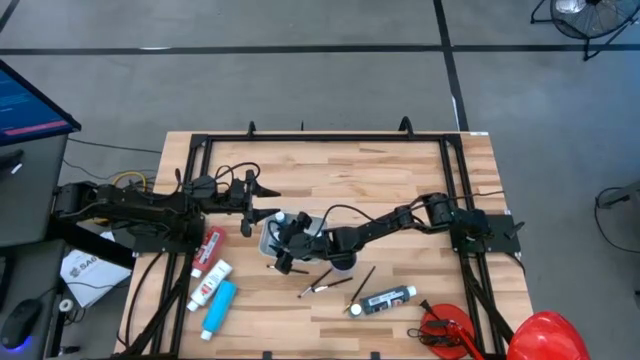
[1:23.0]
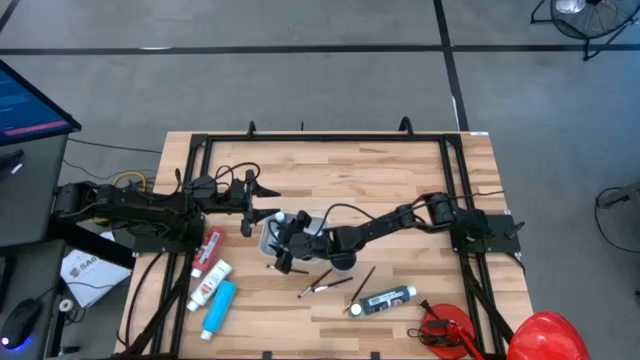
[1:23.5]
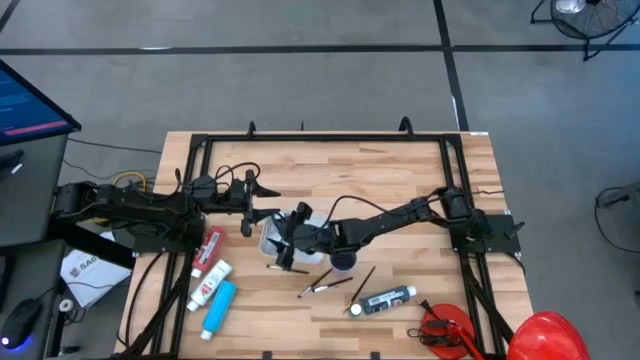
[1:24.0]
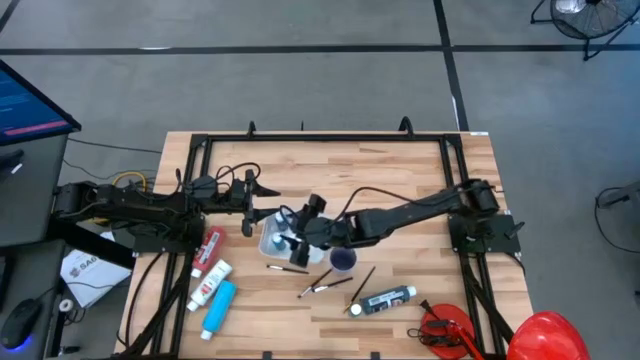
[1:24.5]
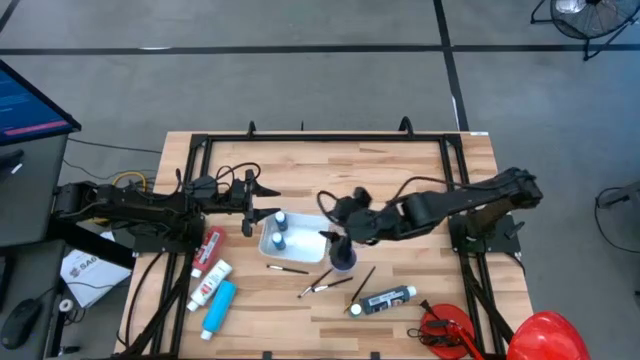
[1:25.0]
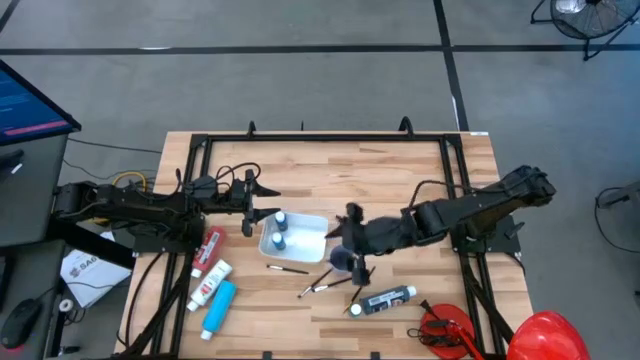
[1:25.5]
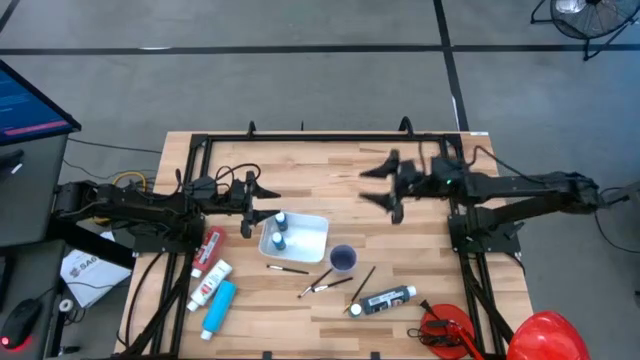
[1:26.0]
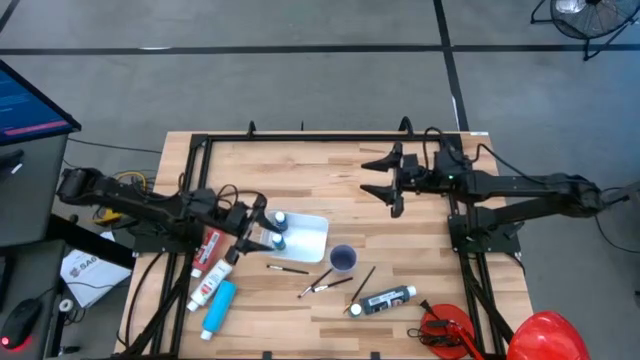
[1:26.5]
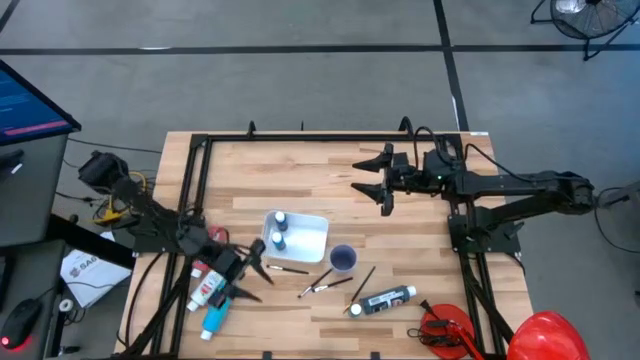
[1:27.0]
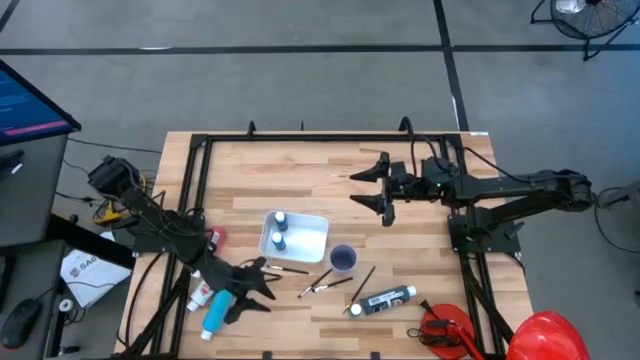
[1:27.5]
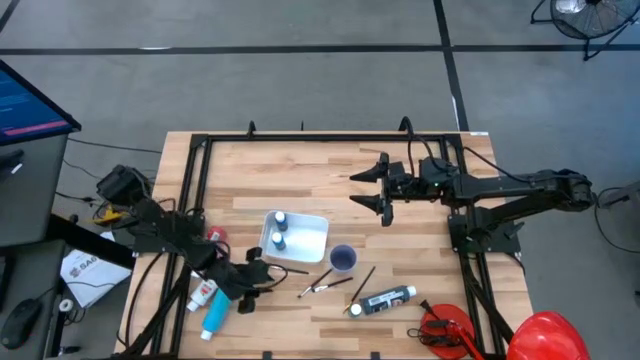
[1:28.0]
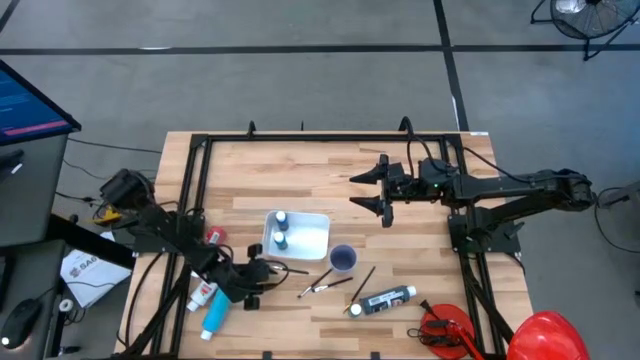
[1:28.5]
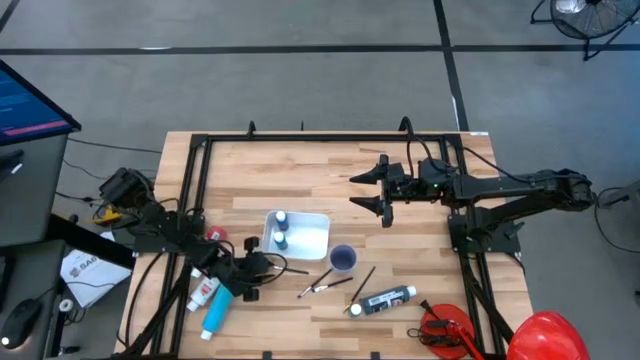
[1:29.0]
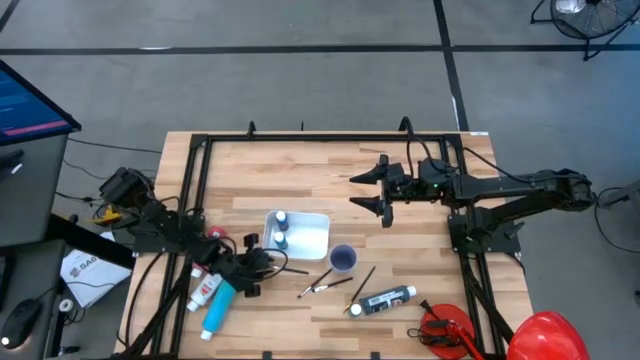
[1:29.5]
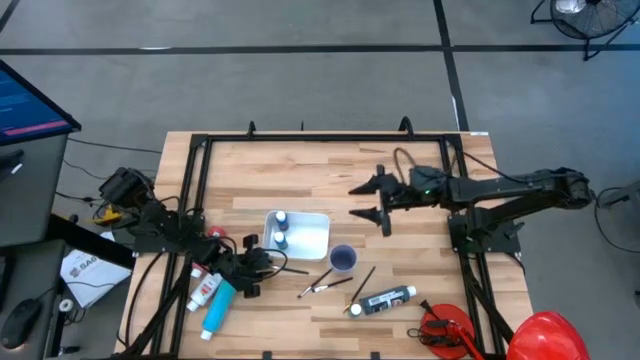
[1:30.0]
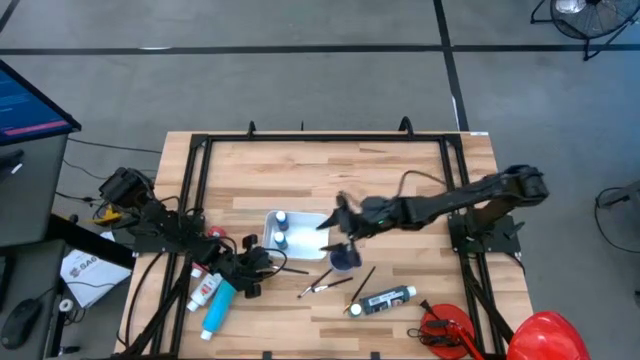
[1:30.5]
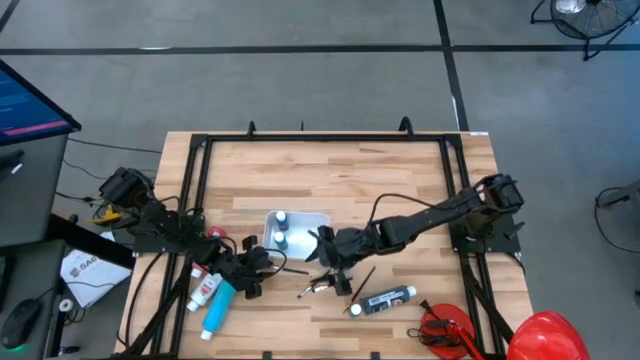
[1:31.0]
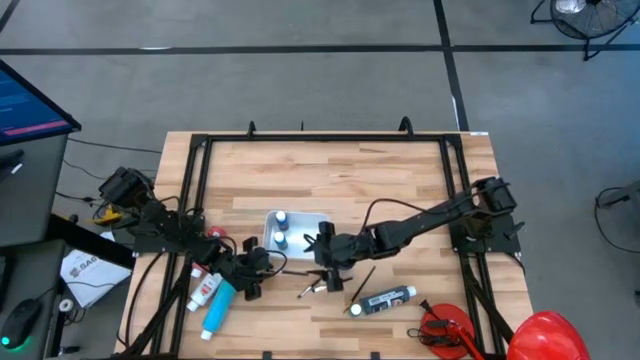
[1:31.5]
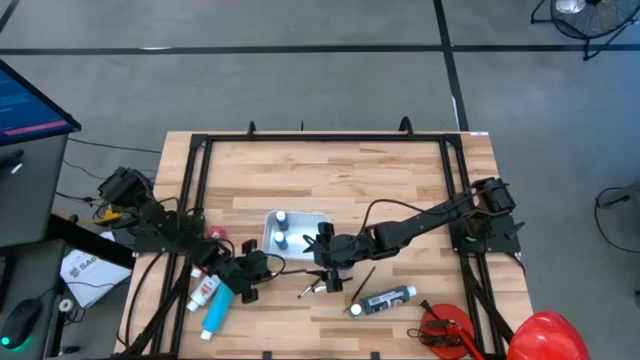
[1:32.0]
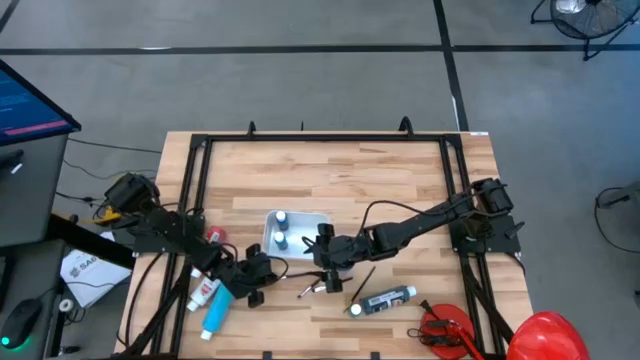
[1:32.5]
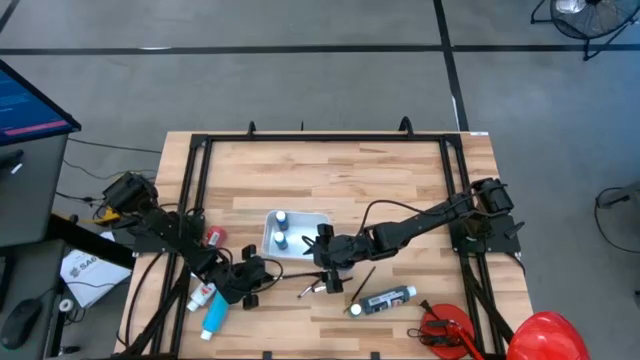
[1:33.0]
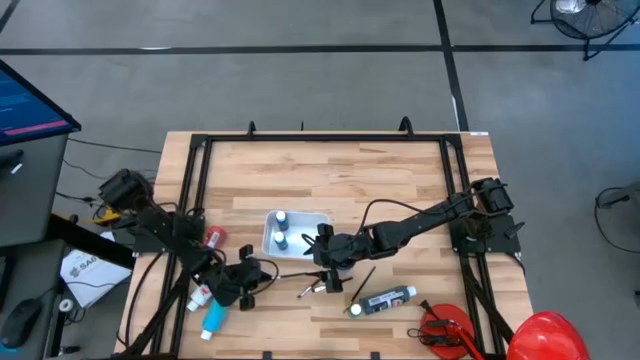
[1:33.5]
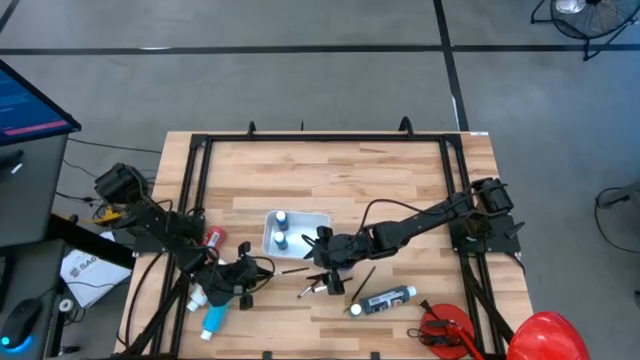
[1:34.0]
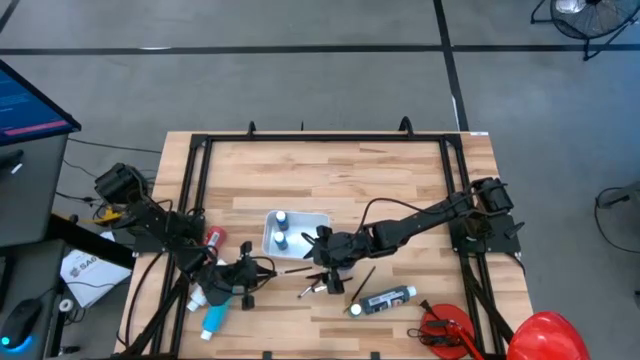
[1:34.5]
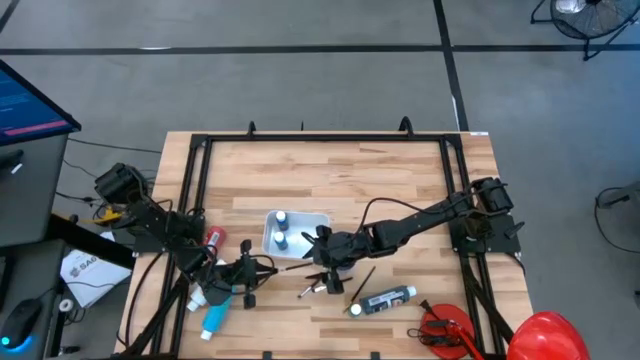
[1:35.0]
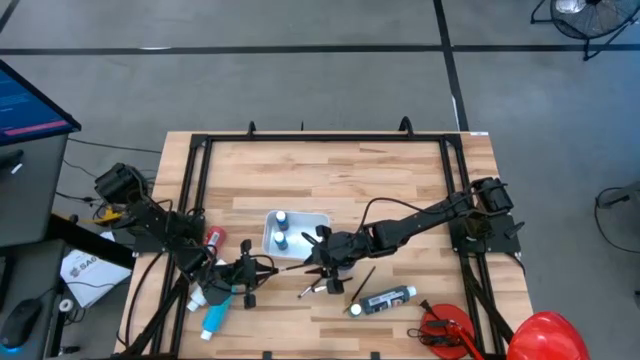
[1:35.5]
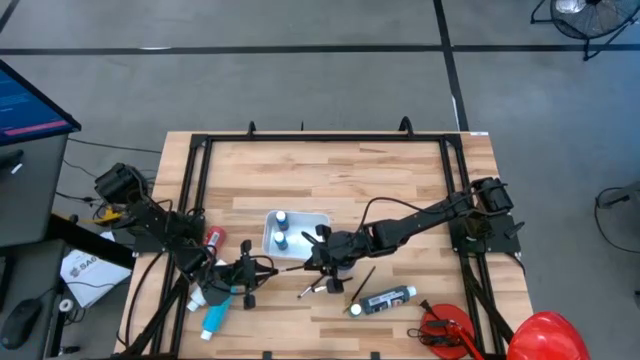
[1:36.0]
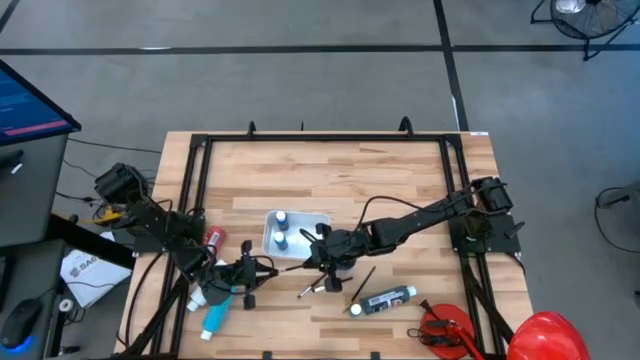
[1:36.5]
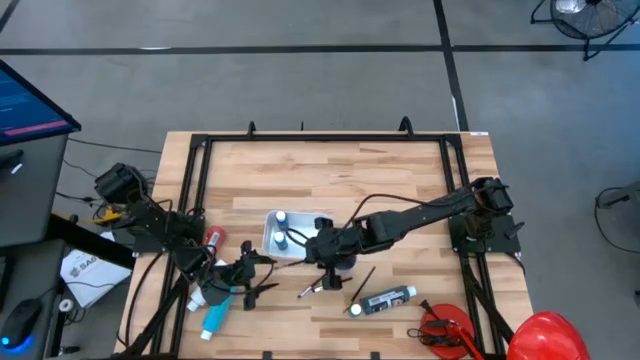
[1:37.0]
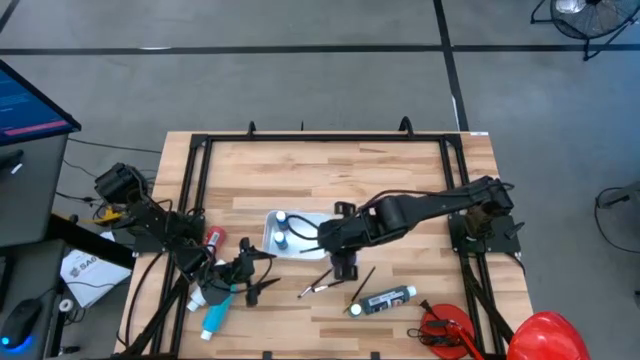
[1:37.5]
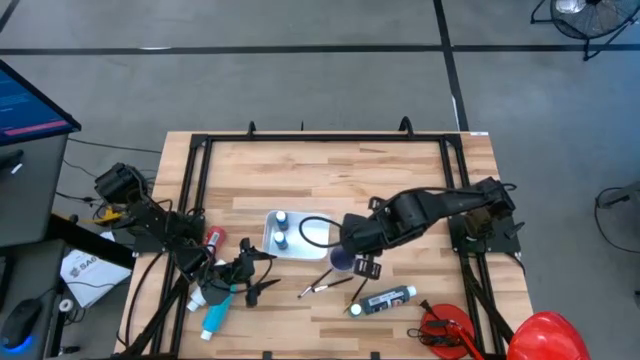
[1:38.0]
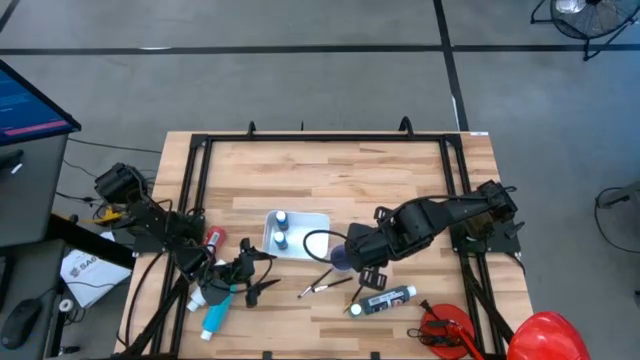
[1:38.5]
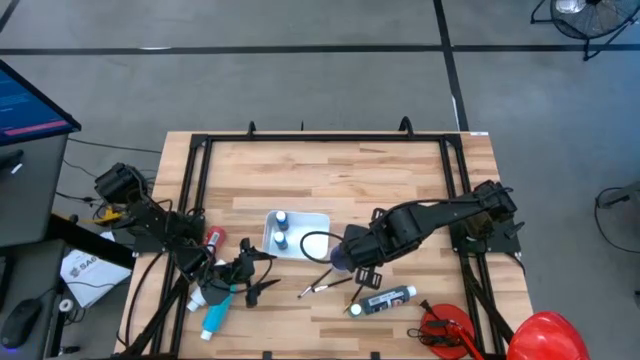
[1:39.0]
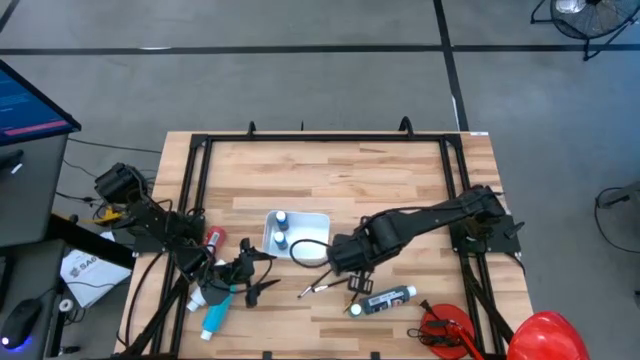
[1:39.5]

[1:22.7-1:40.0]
Task: Pick & Place Paint Supplies
Put the silver paintbrush into the blue cup

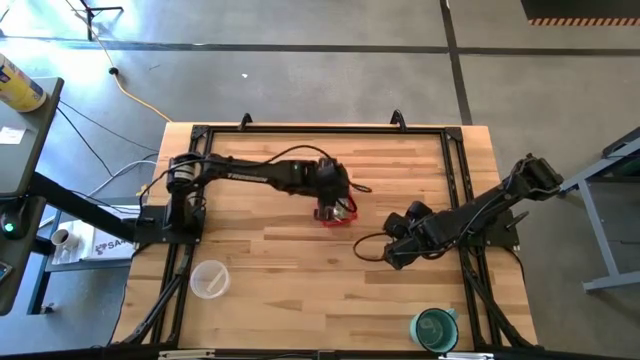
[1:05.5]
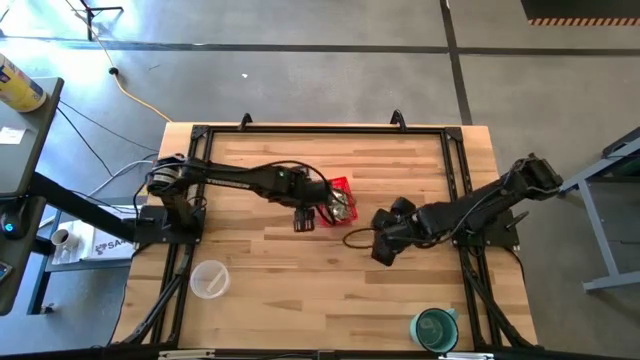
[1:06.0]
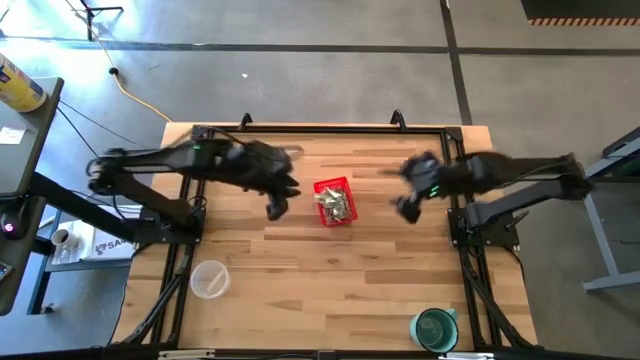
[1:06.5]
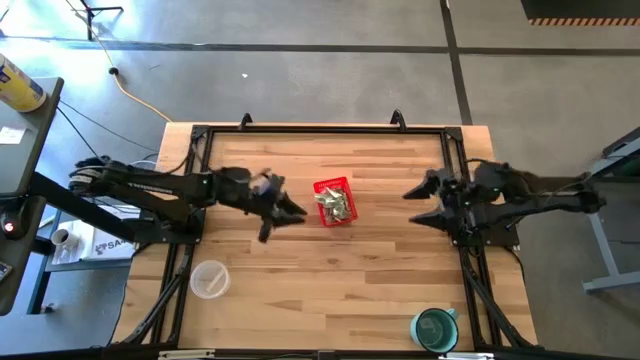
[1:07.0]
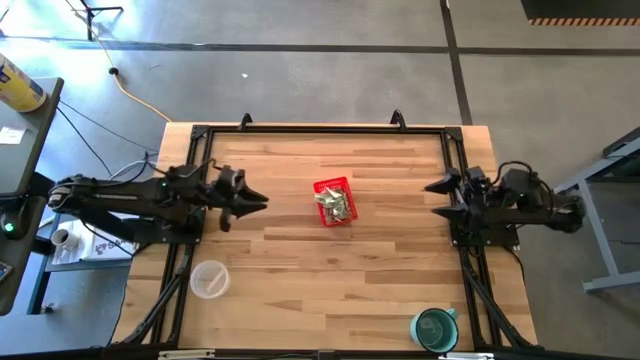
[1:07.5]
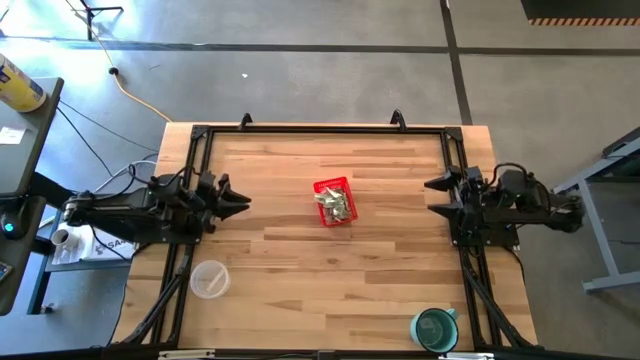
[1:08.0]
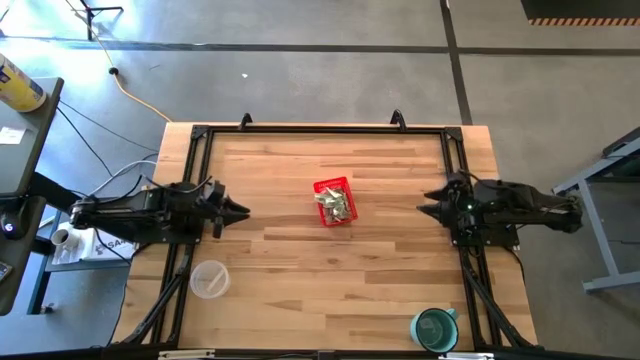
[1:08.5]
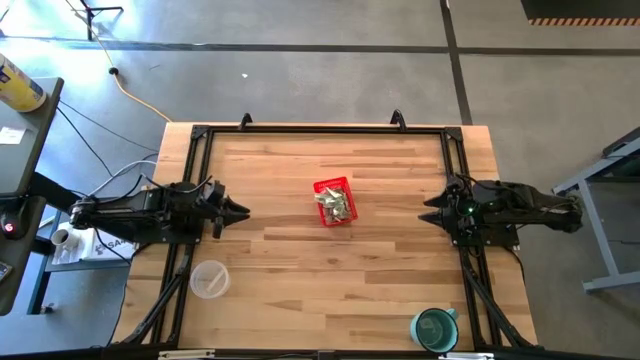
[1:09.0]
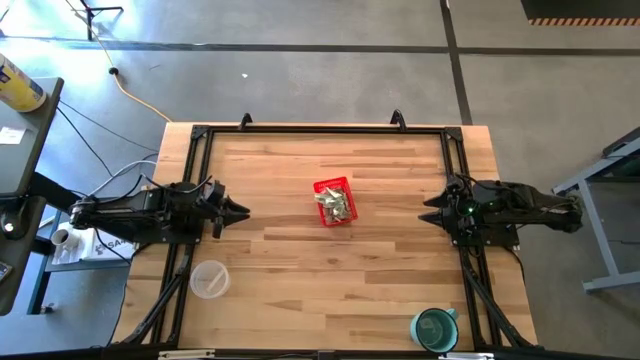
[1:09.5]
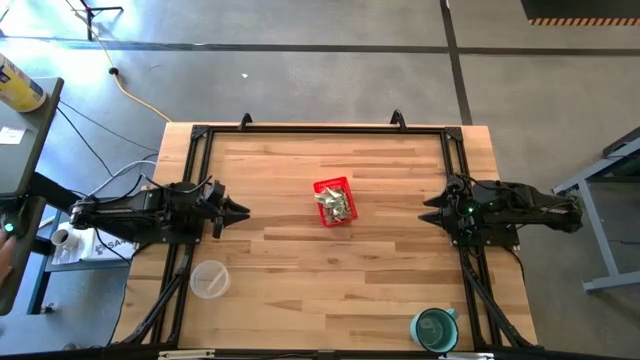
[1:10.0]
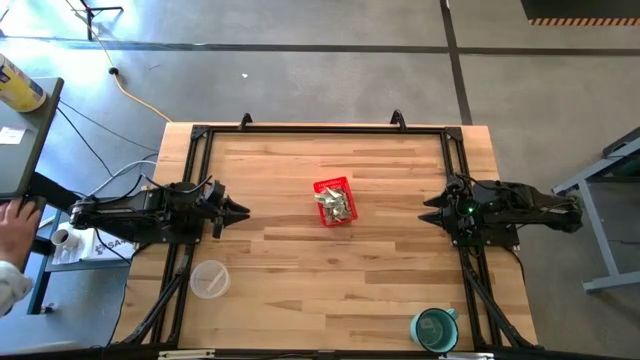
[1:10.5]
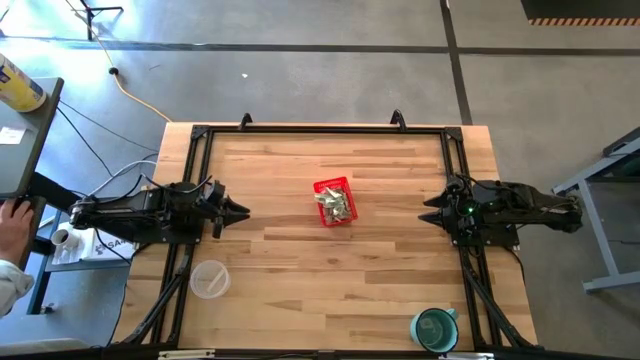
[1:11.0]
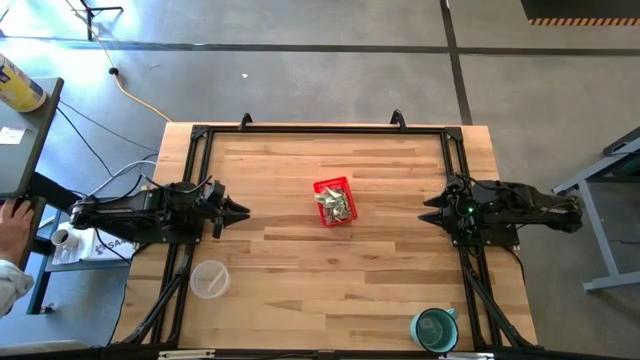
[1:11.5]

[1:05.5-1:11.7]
Task: Pick and place items into bin
Return to Home Position
